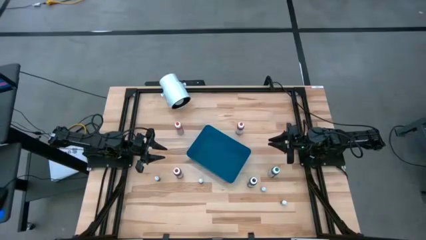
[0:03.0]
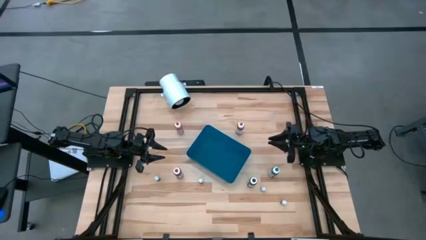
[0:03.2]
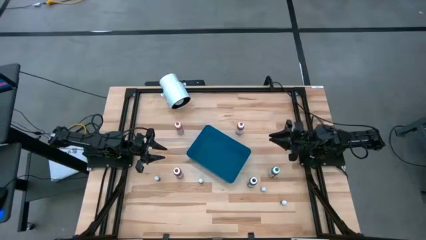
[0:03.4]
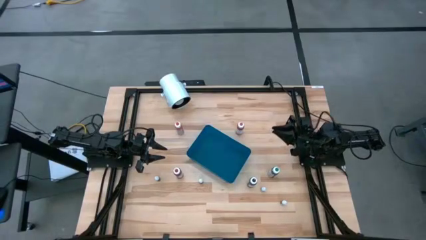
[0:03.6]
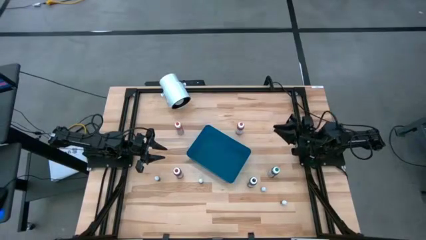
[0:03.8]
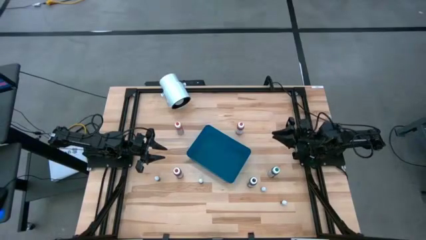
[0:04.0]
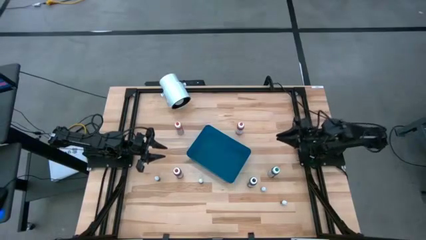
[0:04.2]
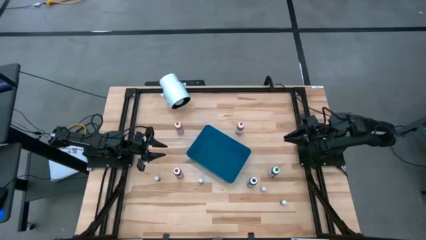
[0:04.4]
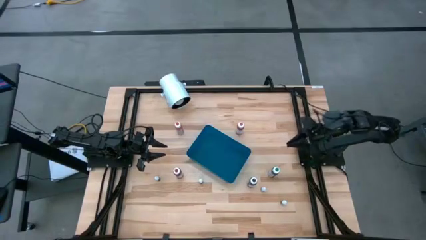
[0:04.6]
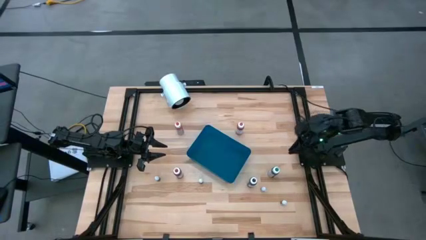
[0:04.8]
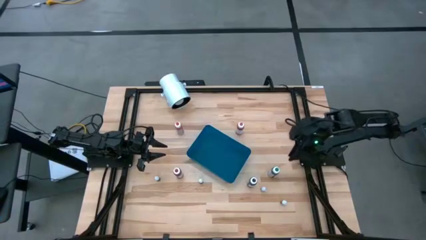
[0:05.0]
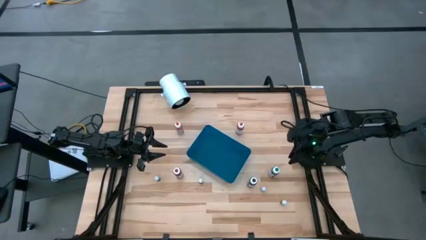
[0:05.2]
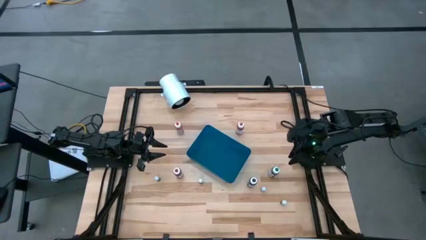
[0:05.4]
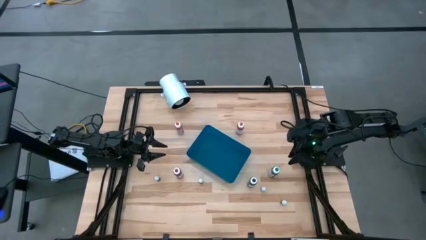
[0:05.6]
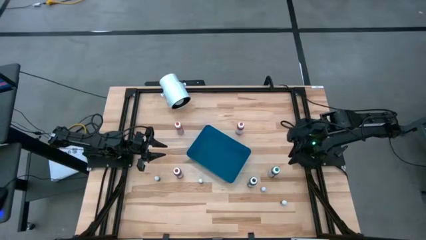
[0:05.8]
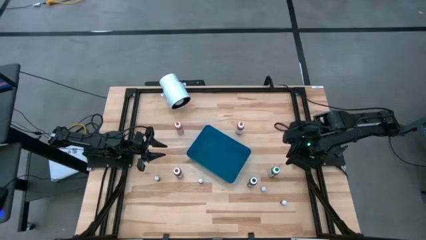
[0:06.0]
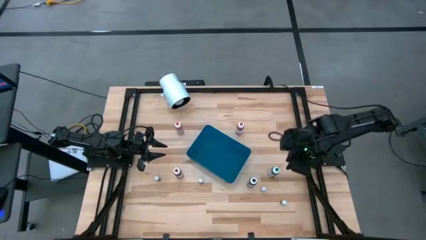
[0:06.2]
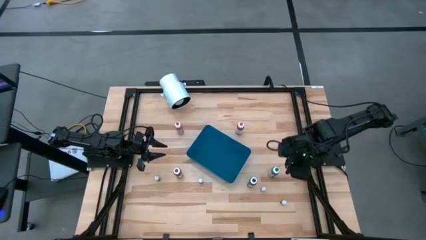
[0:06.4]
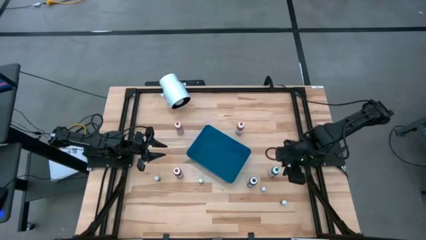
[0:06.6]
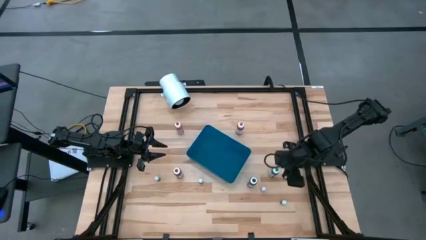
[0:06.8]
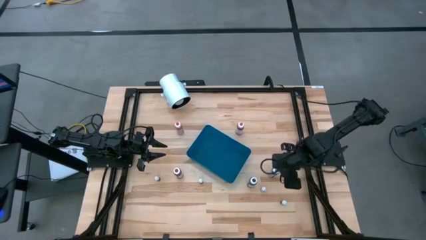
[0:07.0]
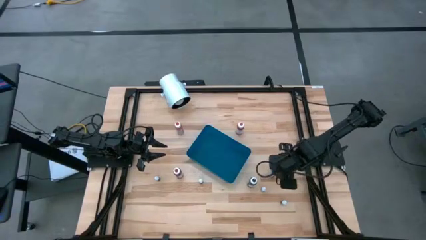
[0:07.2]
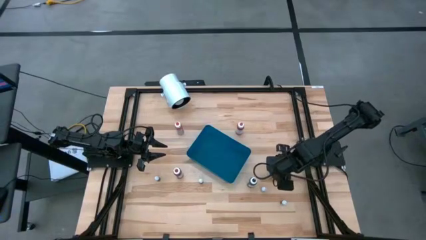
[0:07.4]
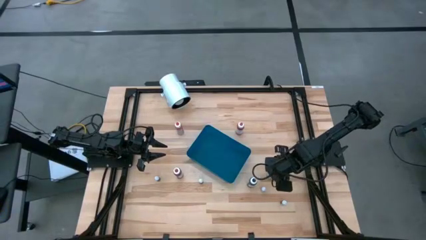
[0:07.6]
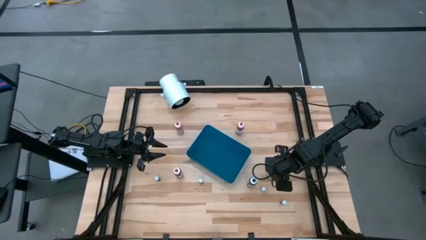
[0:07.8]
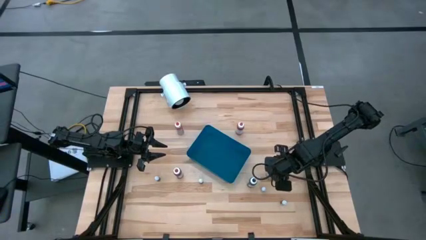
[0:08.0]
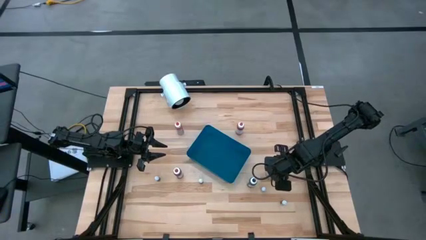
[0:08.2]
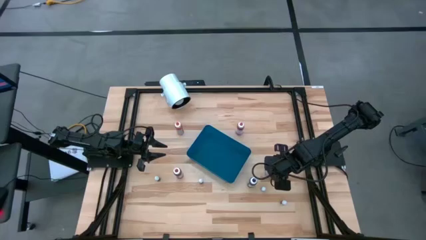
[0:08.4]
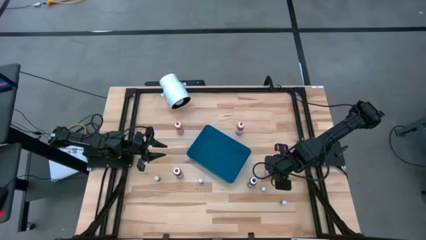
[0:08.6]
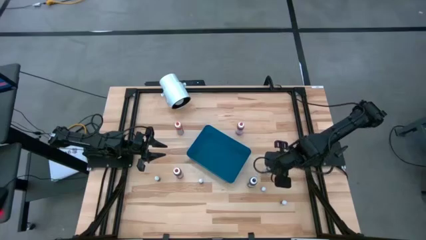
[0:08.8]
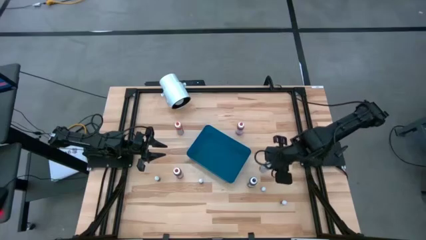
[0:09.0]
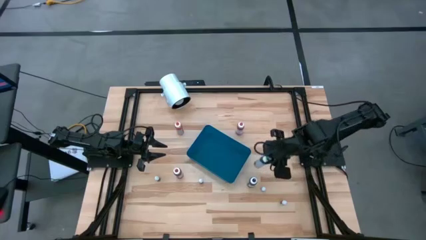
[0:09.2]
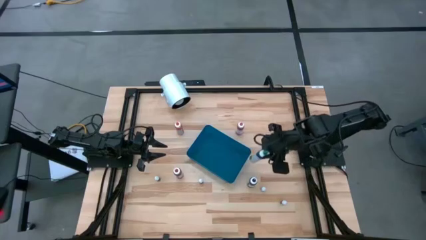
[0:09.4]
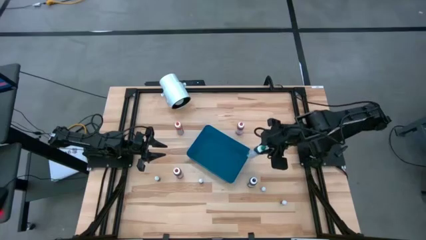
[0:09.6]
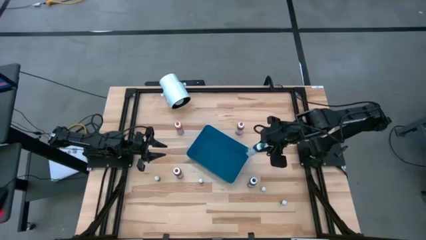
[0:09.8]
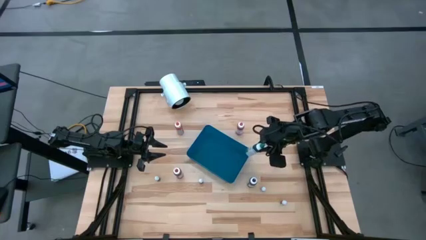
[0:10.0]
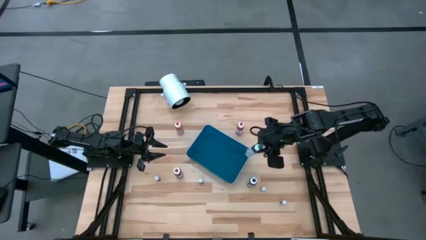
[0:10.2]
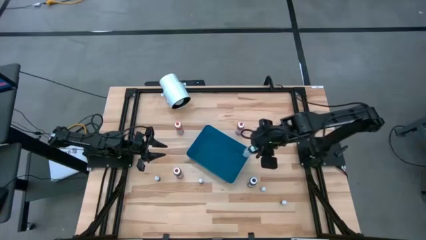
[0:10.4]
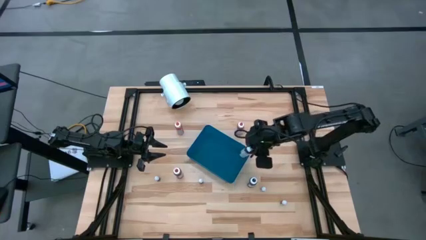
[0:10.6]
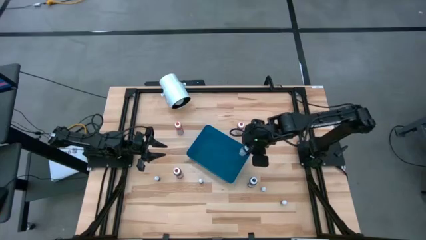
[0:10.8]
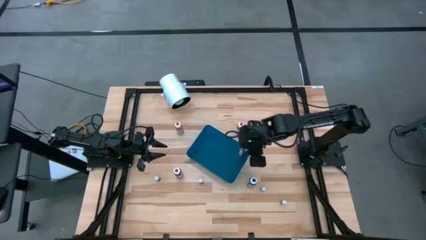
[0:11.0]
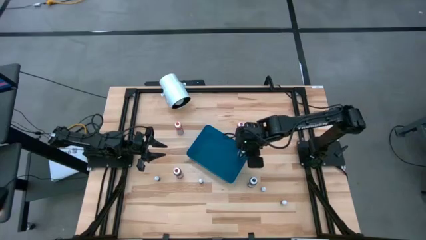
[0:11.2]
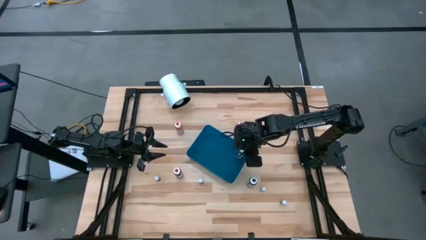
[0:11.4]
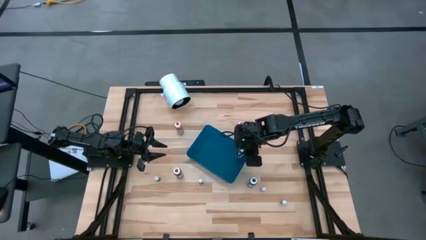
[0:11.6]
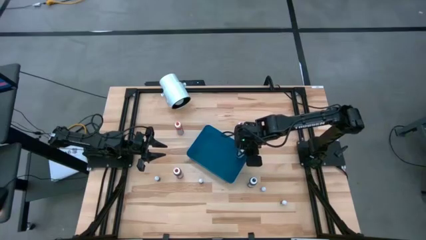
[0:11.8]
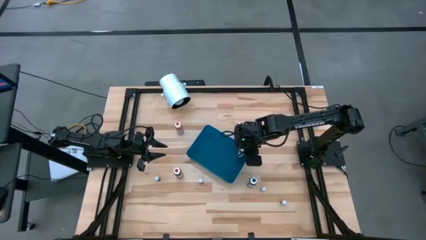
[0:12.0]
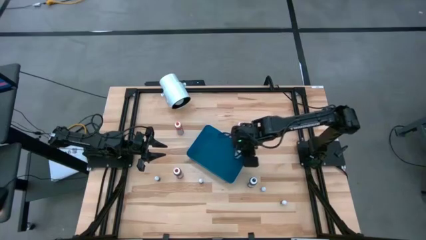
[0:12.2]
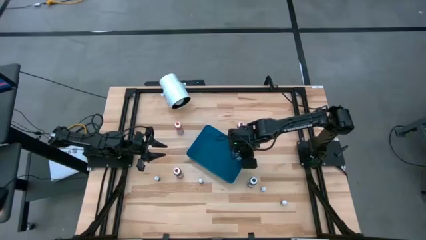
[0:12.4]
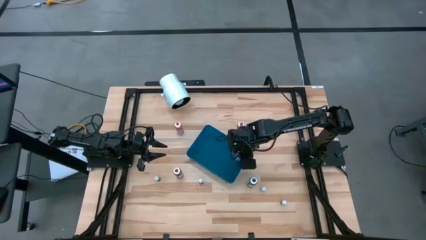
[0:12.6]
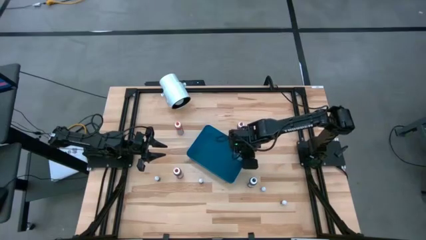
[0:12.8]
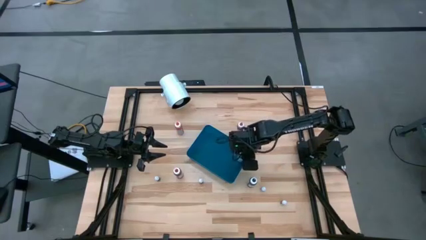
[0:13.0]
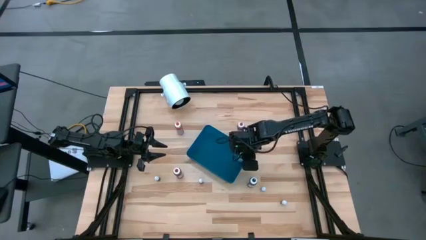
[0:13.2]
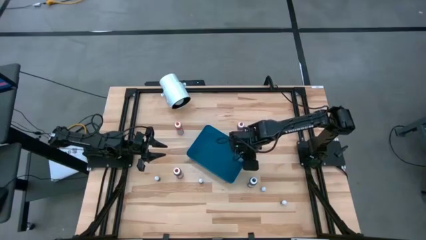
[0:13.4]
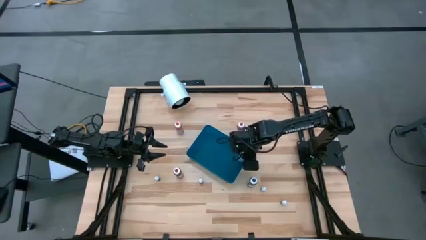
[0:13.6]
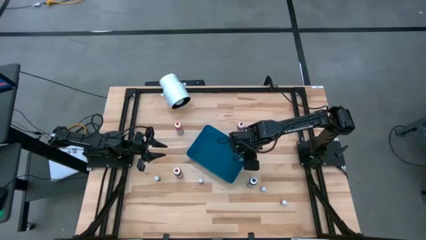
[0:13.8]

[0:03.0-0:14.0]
Task: Pick & Place food coloring
Put the big green food coloring bottle into the blue bin
